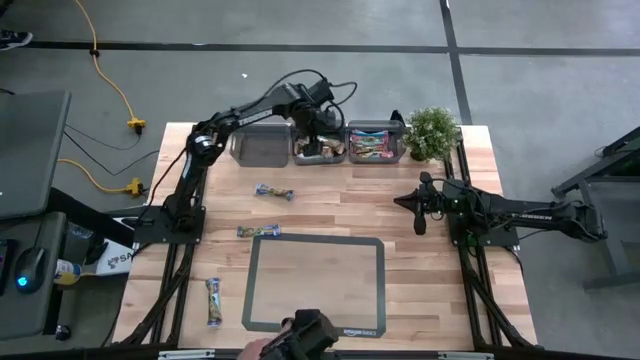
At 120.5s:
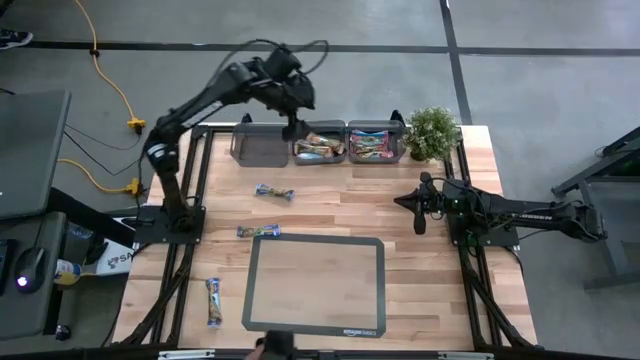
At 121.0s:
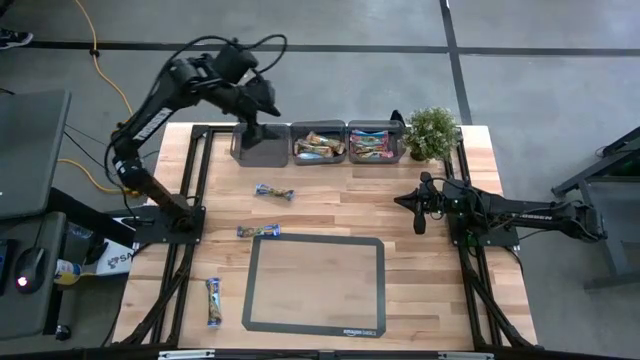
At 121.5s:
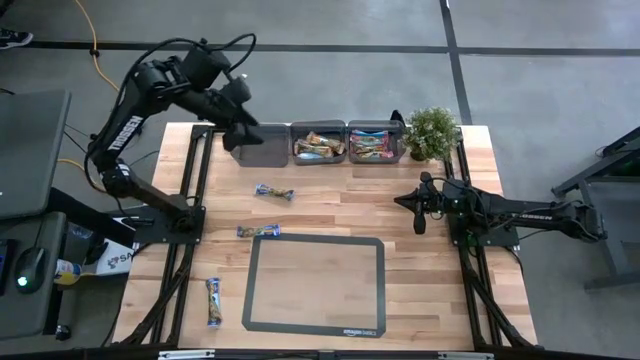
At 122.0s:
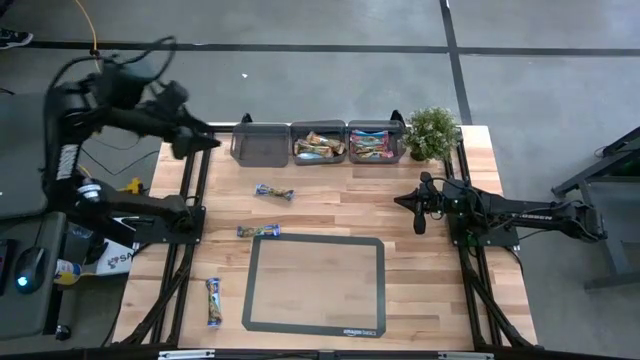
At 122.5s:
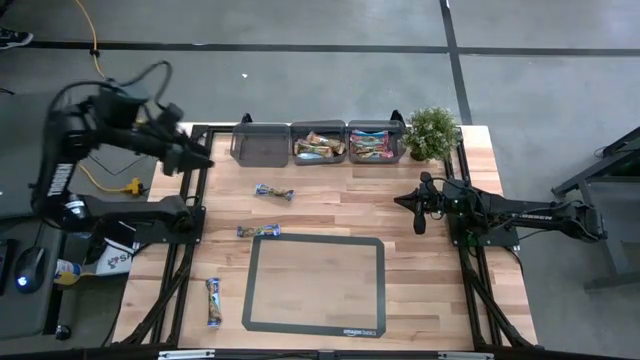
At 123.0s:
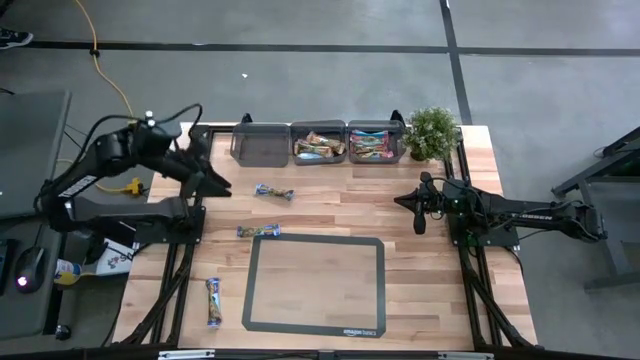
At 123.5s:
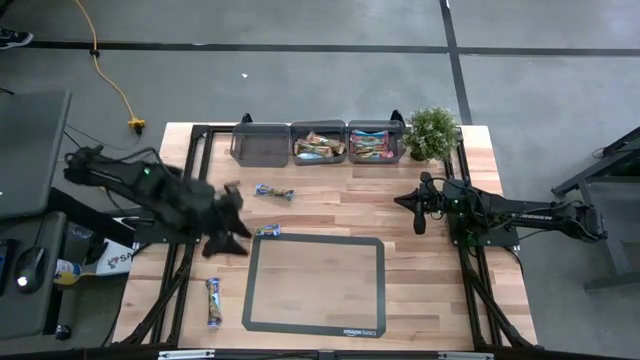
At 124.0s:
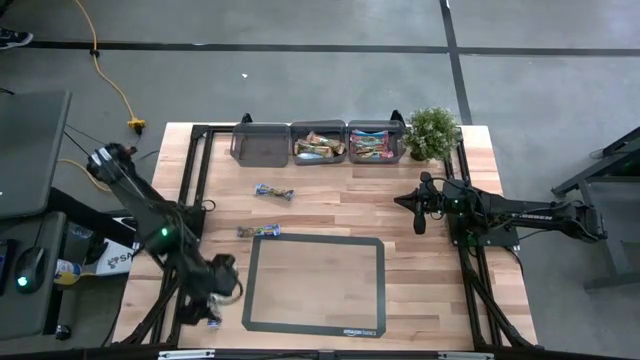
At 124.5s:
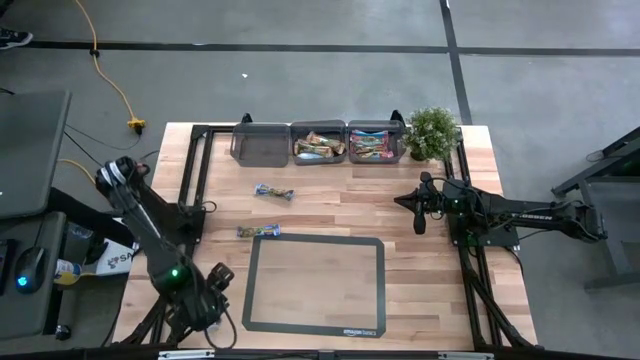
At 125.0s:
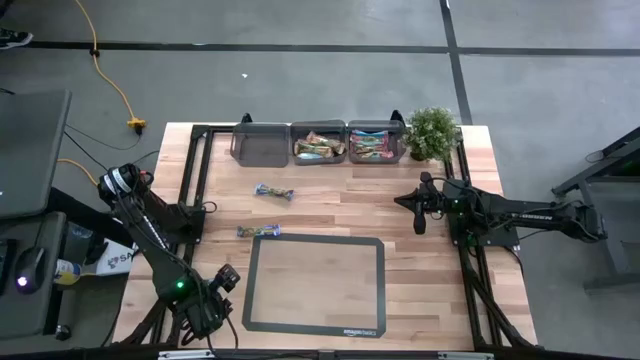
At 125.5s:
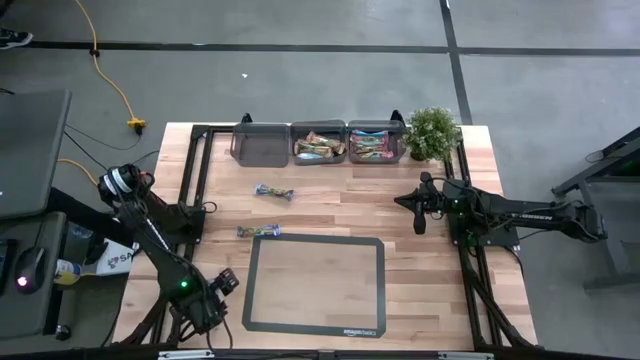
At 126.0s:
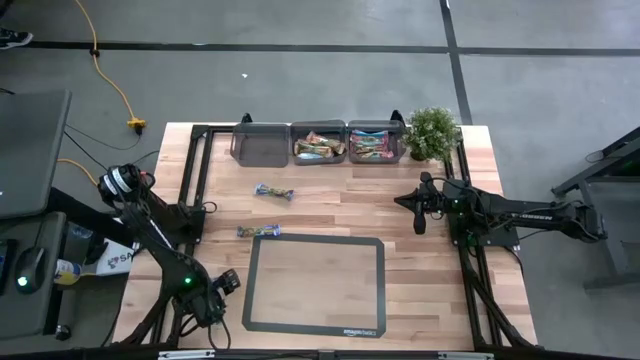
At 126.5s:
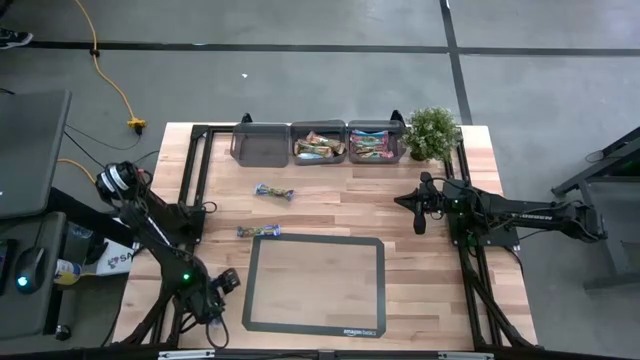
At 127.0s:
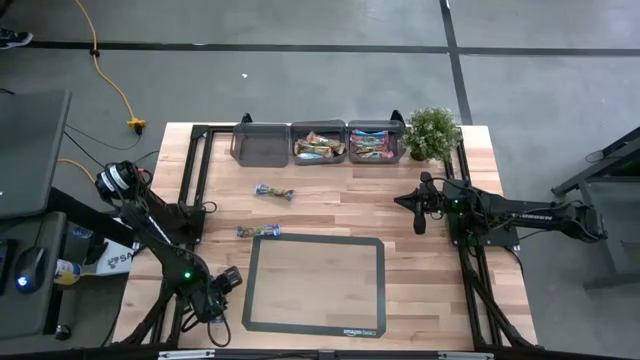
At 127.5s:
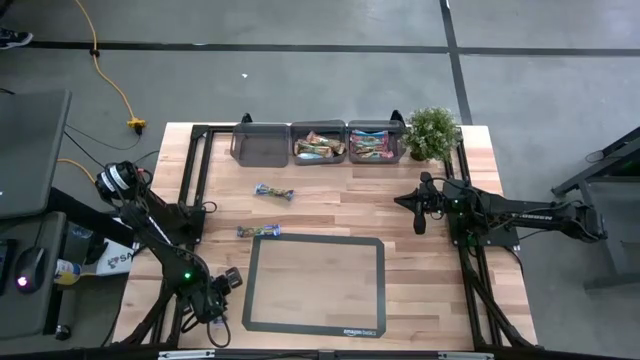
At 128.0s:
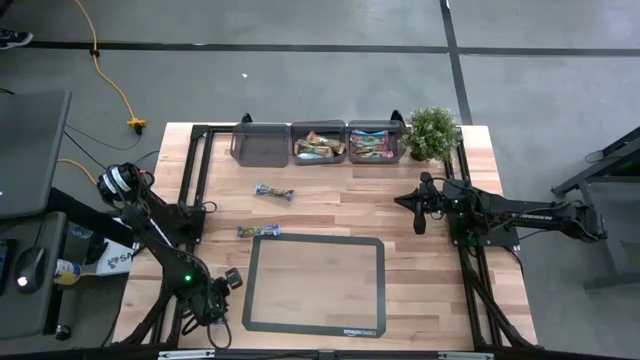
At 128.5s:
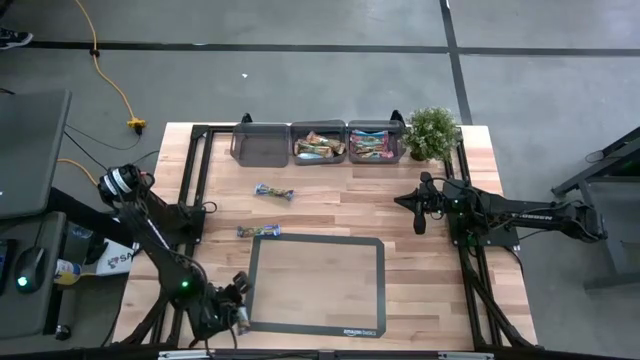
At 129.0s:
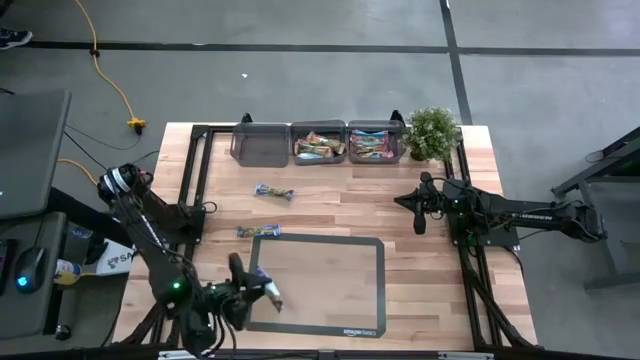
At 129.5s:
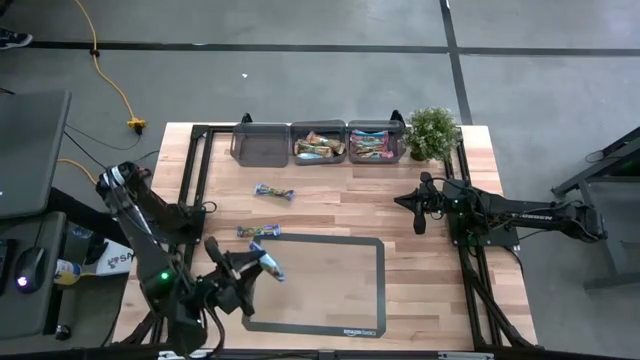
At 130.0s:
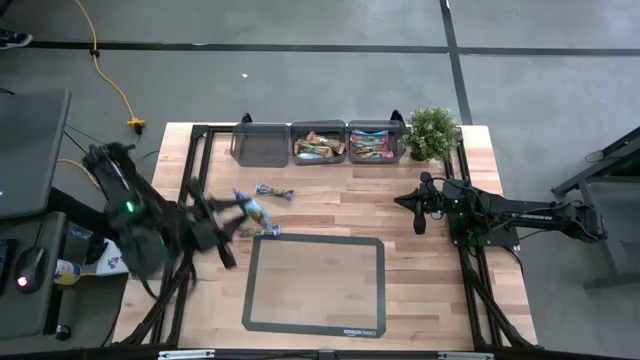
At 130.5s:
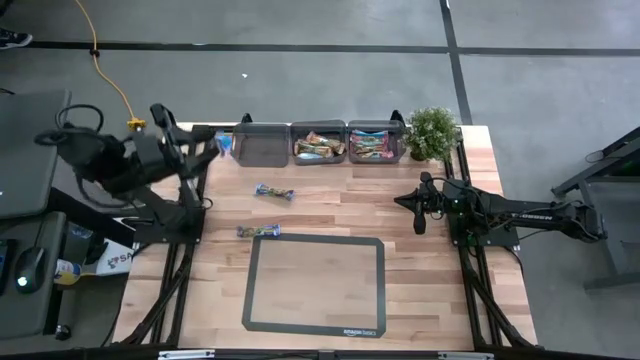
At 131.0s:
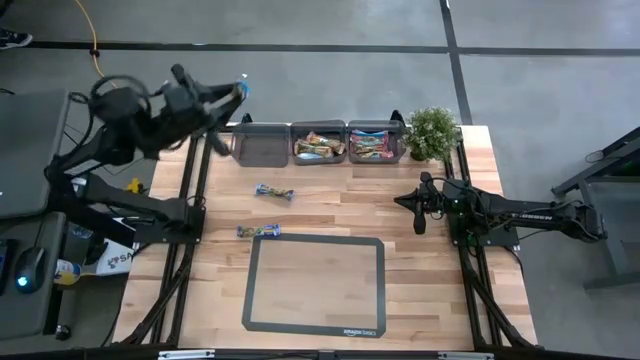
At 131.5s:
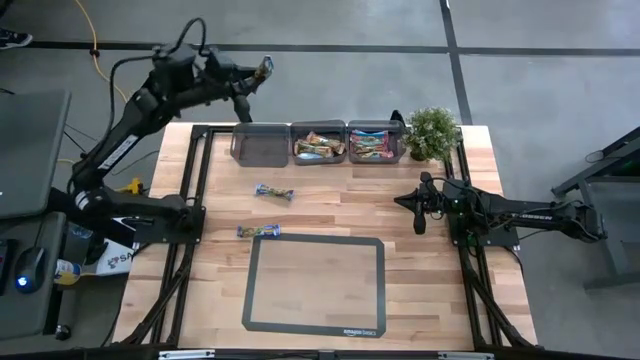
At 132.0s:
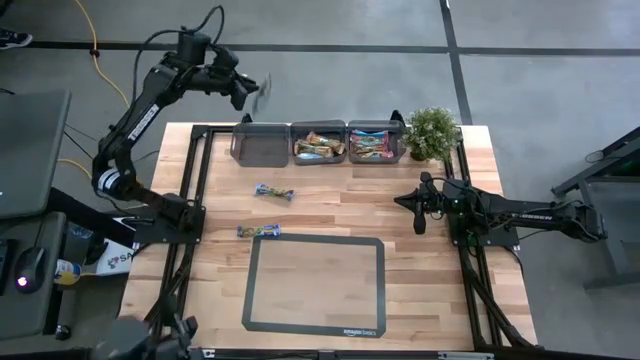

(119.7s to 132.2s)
Task: Pick and place Granola Bars by type
Put the blue granola bar into the left black bin

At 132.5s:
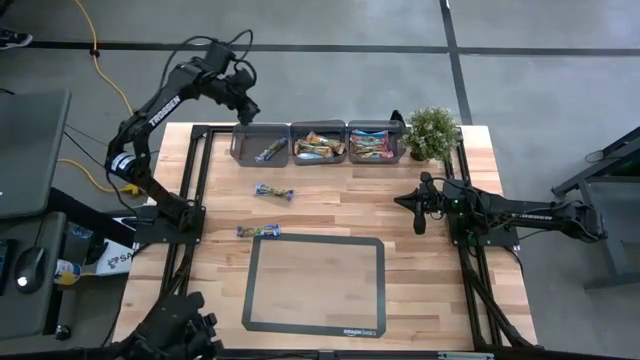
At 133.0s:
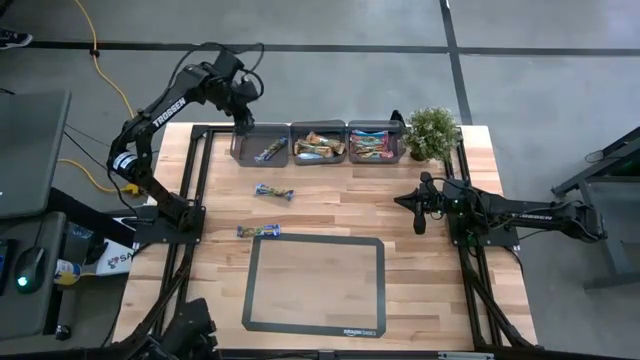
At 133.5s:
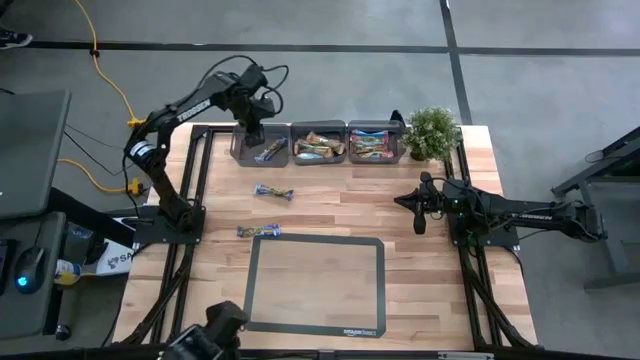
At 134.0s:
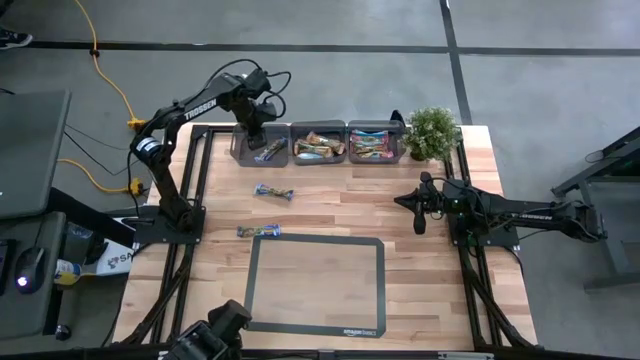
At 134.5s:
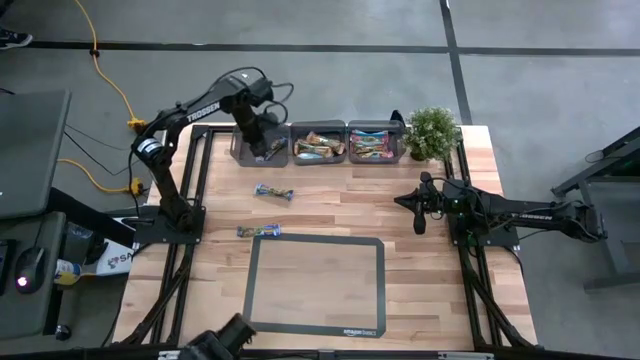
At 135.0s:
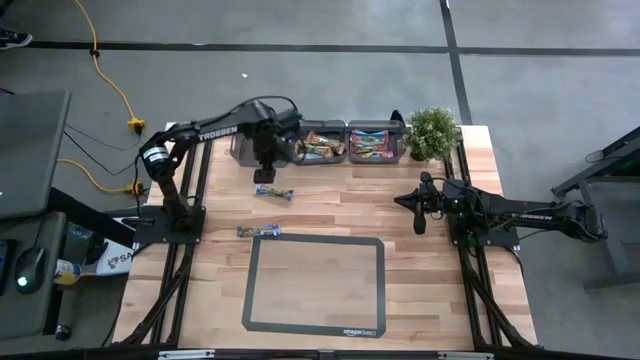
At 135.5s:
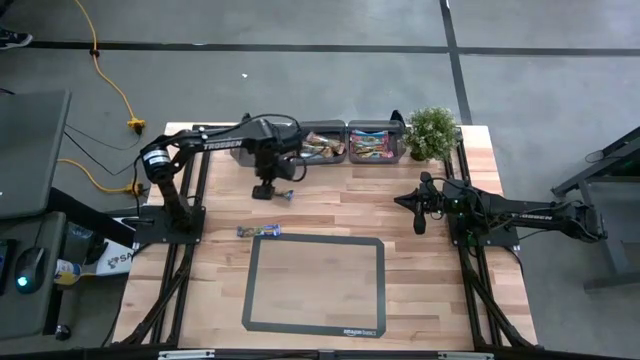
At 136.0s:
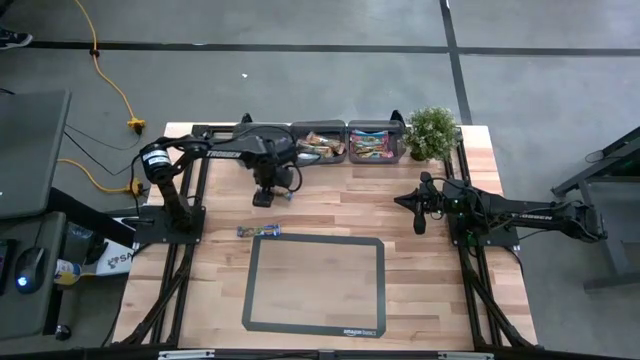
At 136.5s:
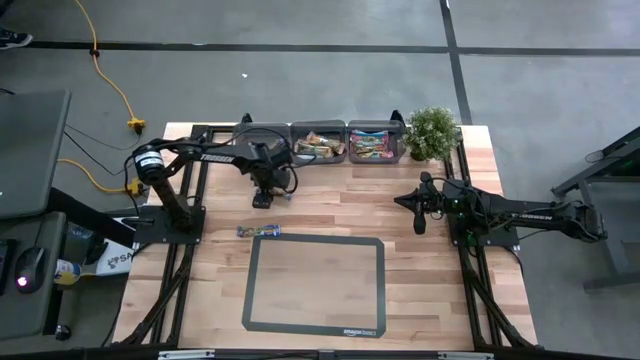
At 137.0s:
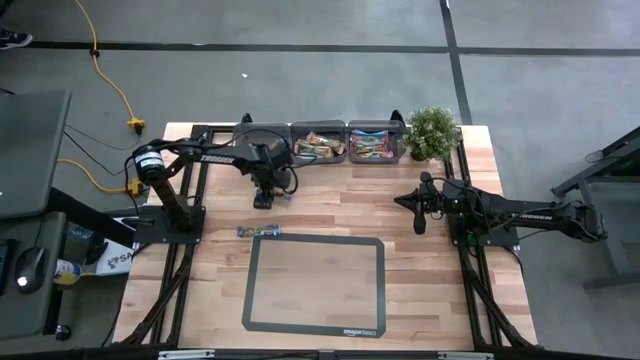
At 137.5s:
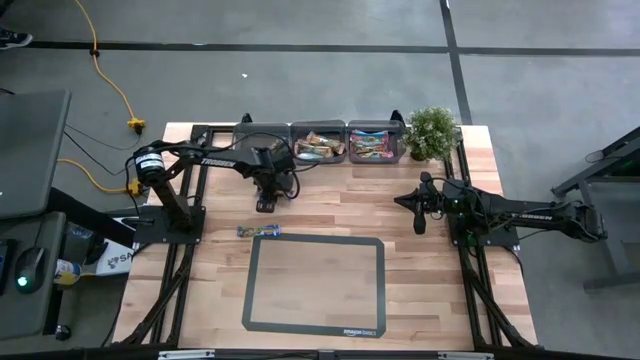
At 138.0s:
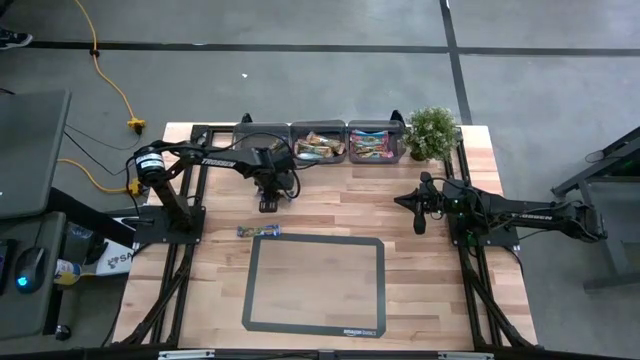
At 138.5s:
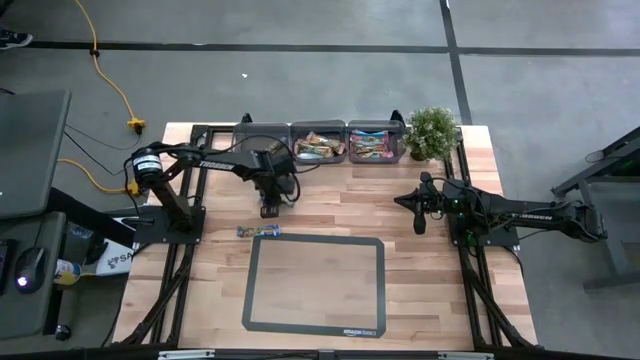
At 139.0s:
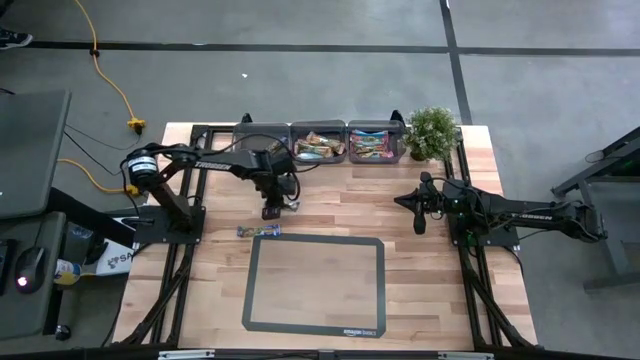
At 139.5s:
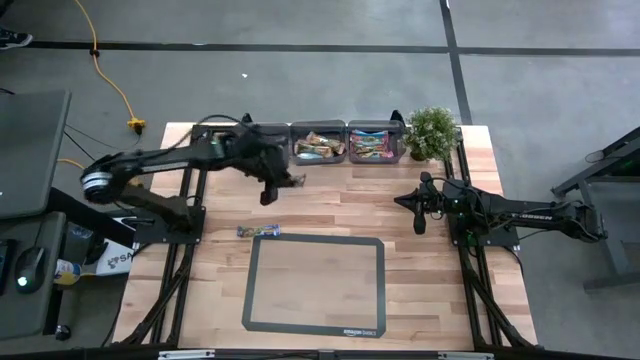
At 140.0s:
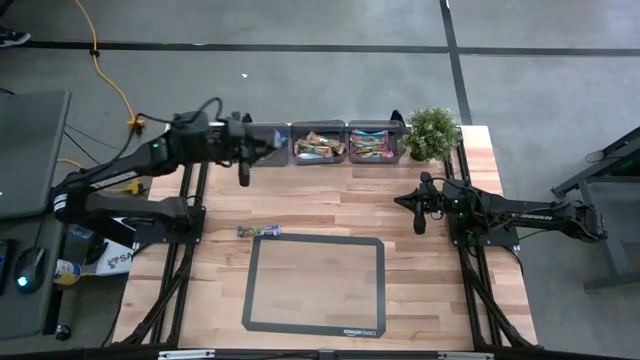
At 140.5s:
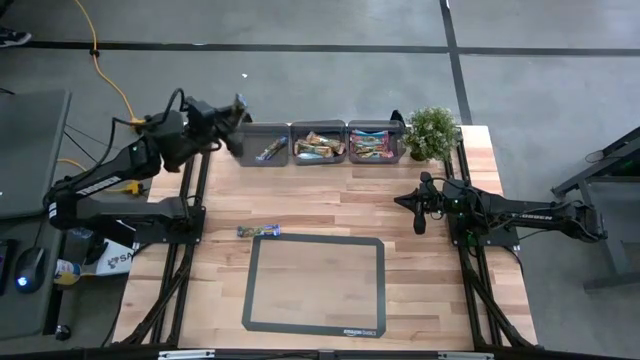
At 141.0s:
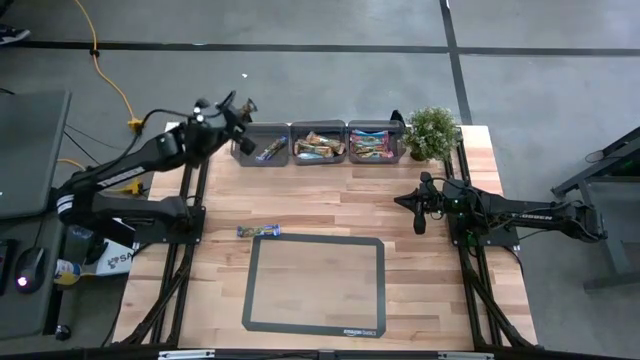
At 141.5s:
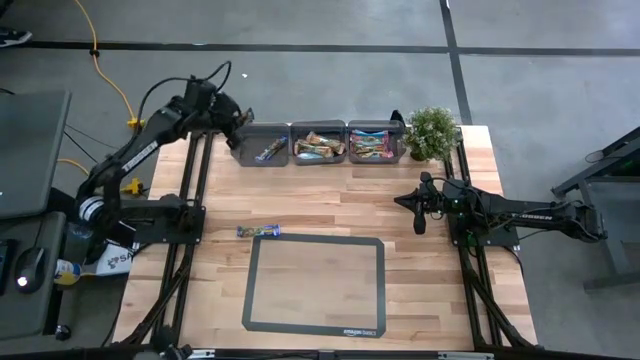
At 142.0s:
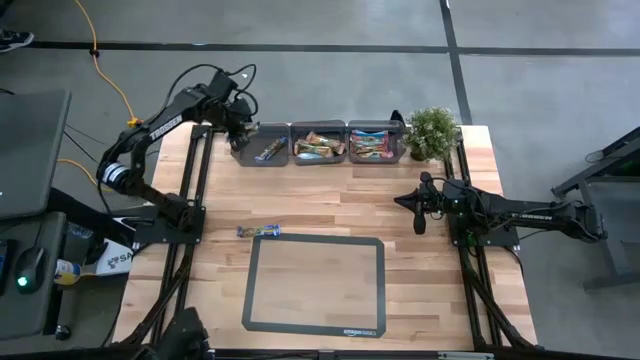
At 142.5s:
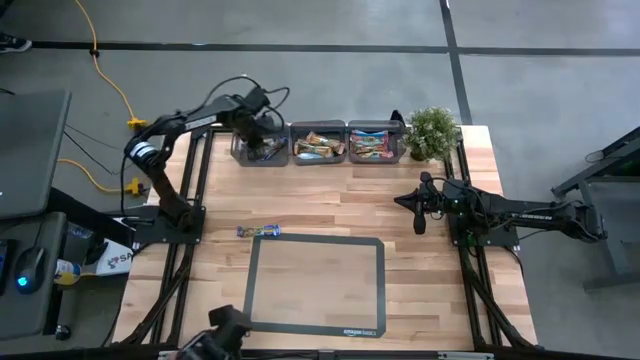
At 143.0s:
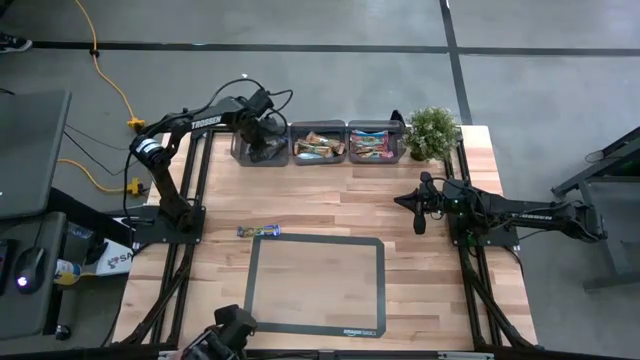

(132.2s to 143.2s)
Put the blue granola bar into the left black bin
